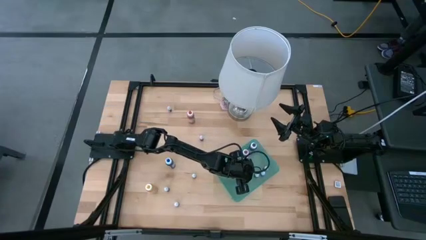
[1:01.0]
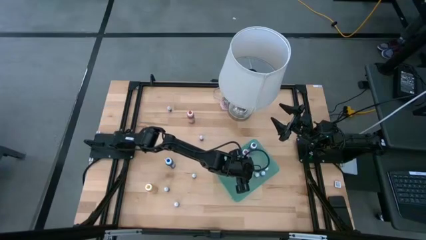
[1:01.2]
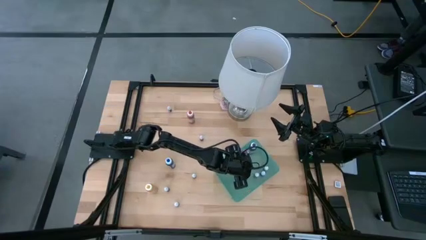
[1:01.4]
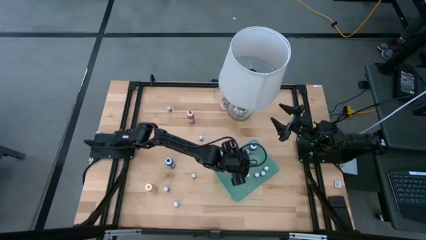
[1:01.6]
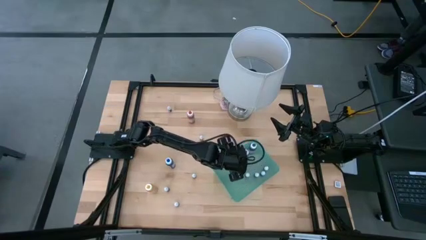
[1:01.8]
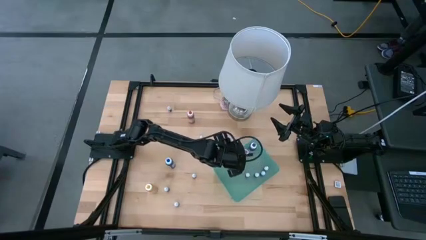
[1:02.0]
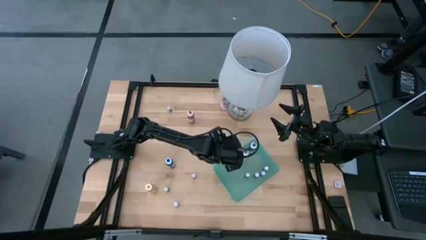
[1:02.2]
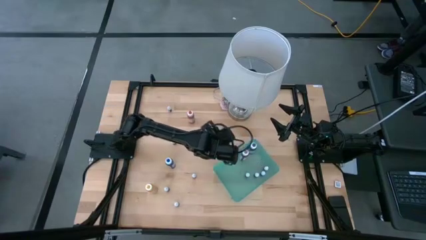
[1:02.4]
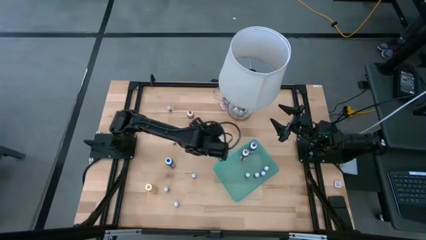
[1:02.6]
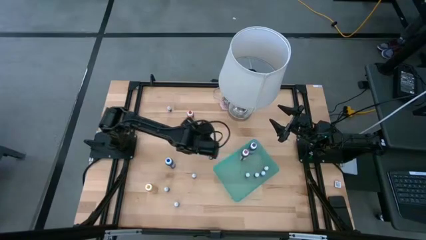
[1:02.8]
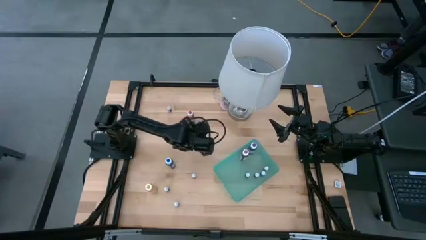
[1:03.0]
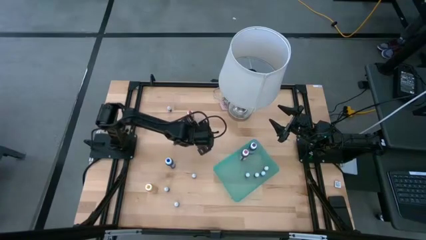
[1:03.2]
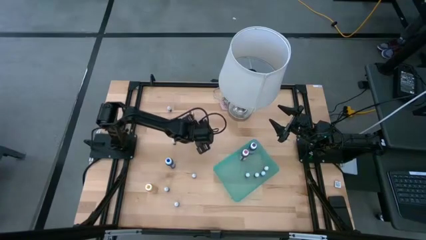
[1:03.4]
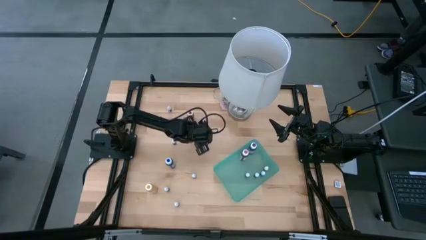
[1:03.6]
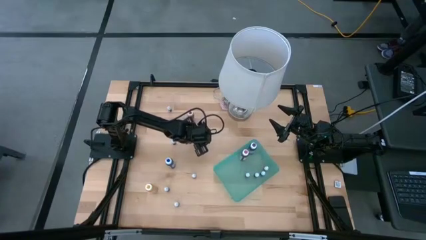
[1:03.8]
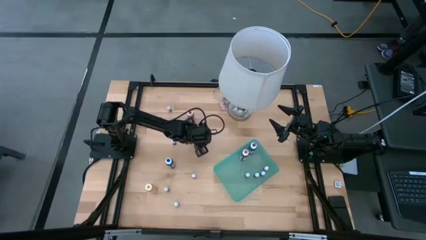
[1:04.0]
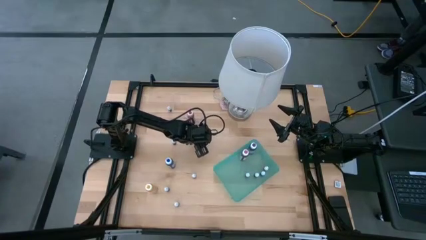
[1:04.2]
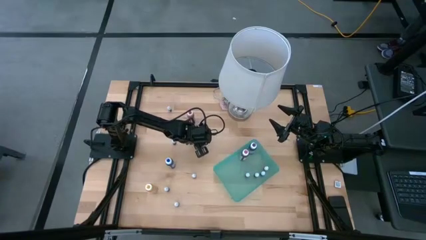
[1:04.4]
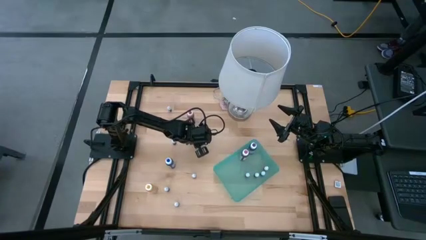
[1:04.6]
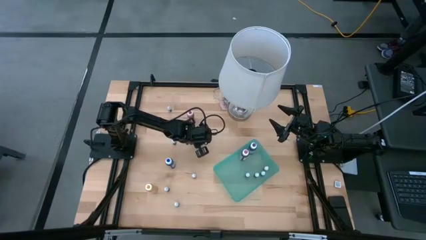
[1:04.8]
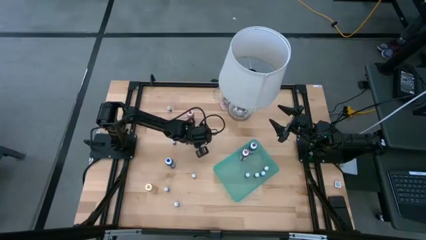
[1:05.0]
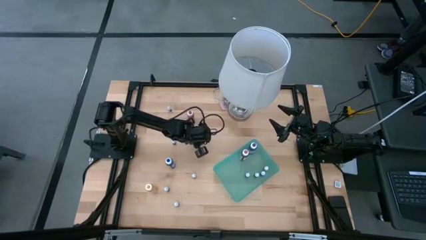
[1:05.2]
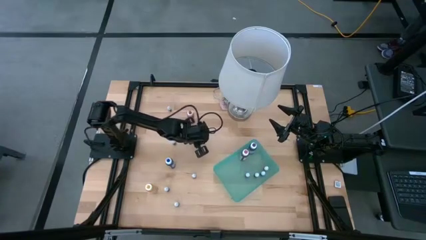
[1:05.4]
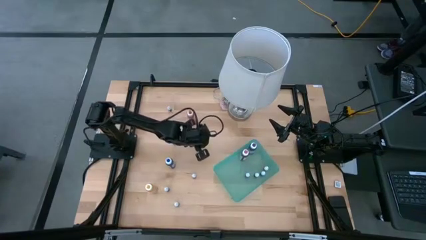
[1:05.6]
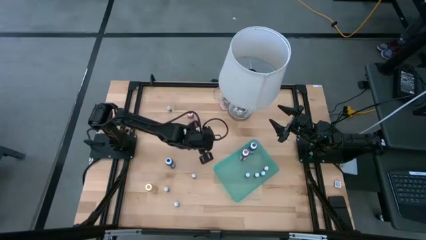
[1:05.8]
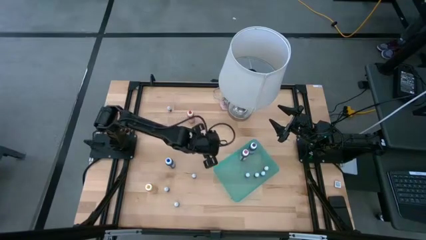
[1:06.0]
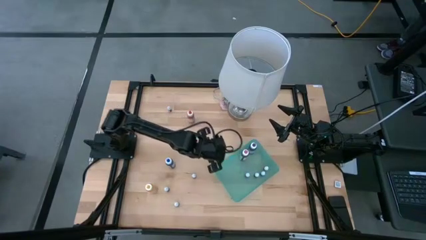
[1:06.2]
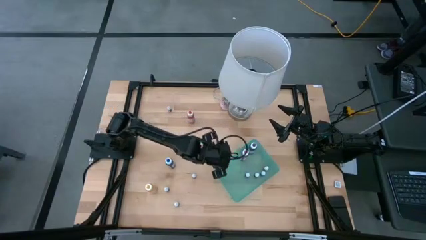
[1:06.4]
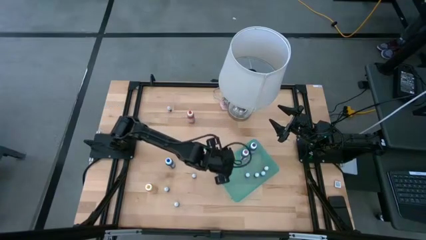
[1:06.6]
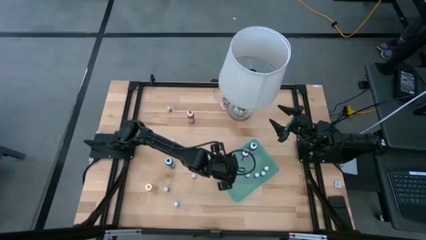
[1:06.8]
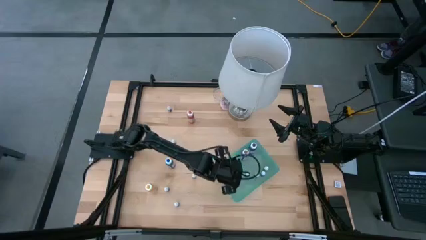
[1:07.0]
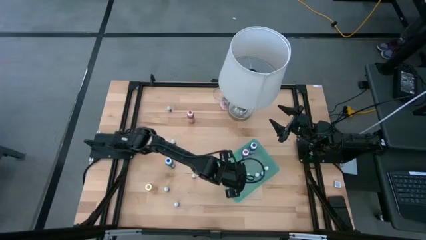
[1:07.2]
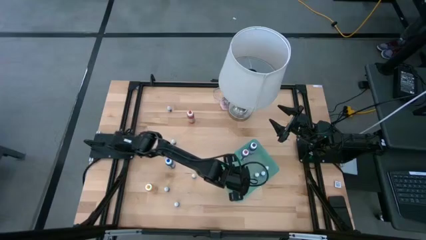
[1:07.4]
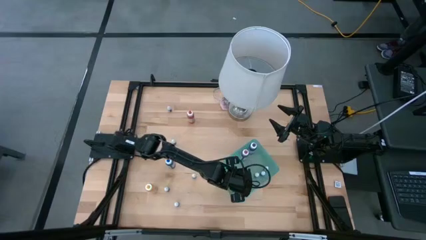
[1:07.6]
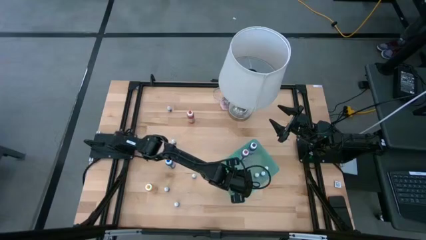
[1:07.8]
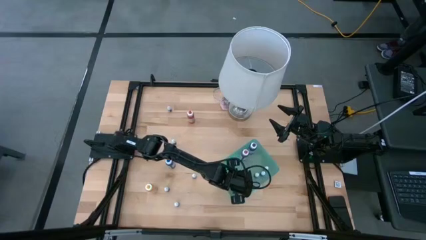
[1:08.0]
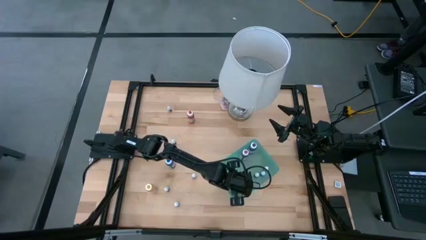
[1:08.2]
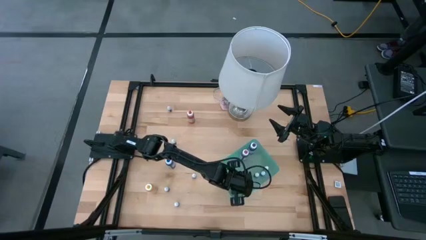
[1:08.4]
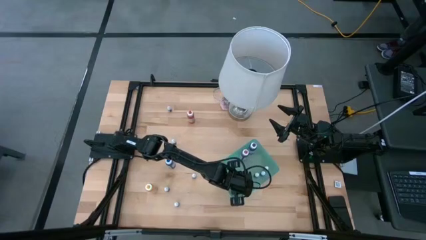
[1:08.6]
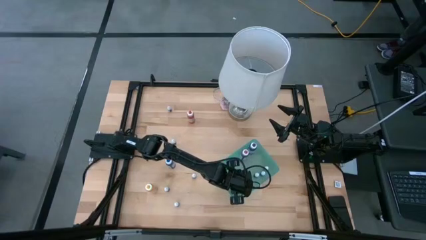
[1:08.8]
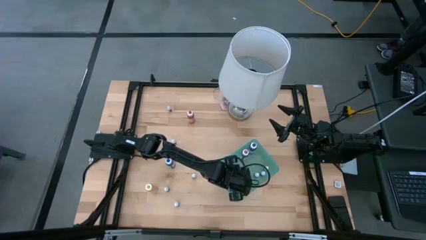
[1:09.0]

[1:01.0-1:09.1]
Task: Pick & Place food coloring
Put the small purple food coloring bottle into the green bin

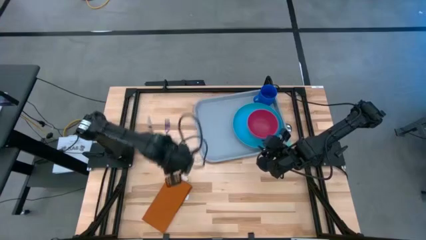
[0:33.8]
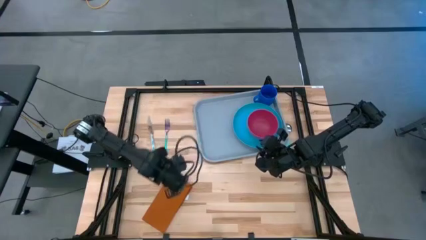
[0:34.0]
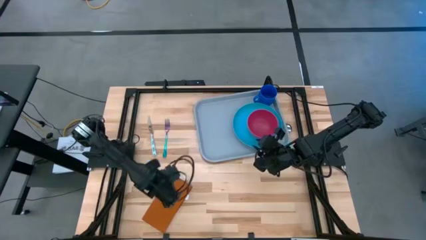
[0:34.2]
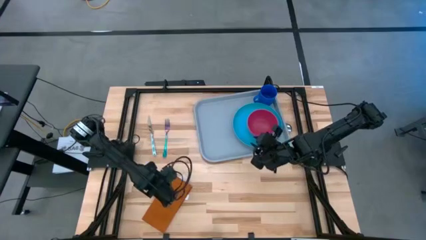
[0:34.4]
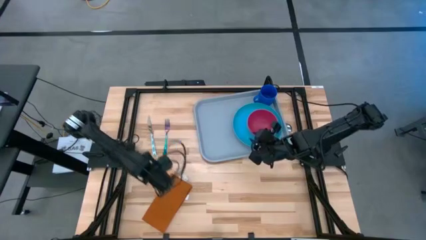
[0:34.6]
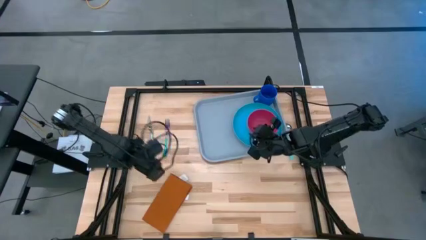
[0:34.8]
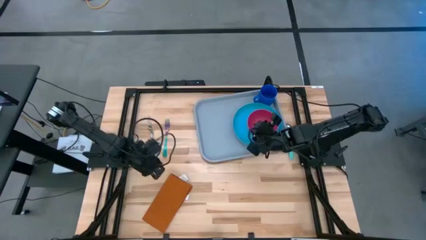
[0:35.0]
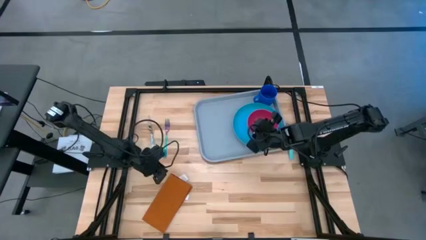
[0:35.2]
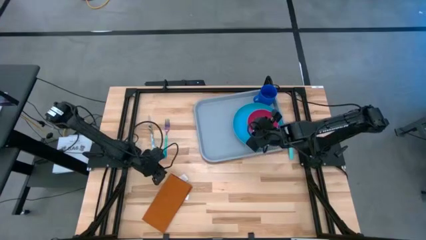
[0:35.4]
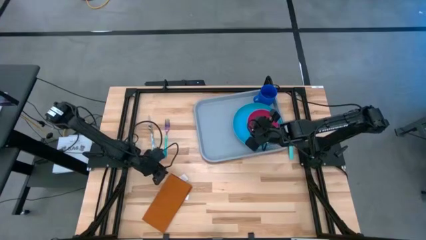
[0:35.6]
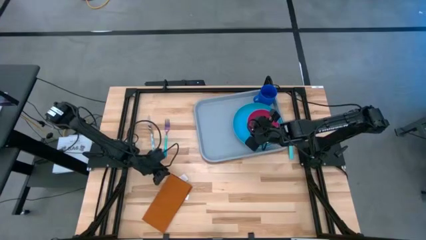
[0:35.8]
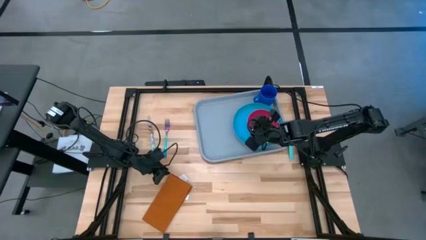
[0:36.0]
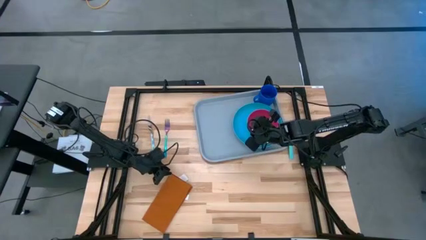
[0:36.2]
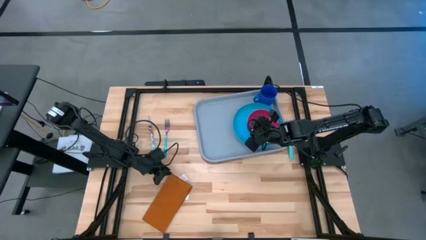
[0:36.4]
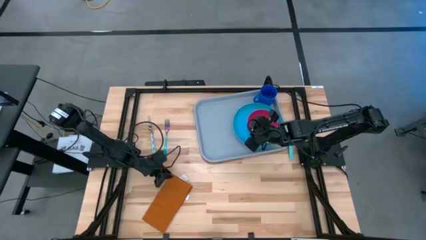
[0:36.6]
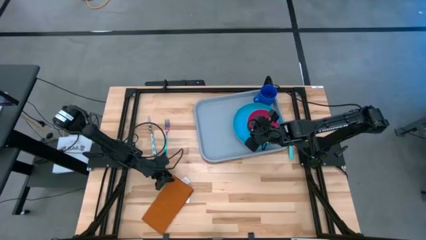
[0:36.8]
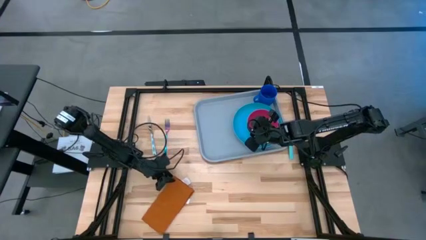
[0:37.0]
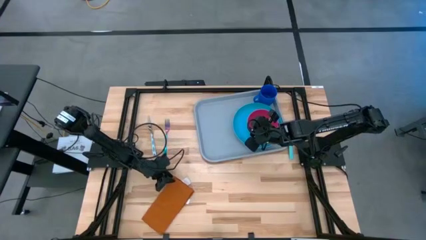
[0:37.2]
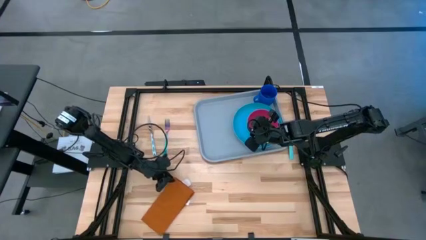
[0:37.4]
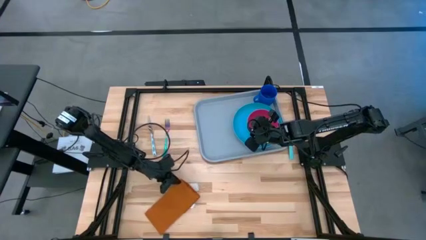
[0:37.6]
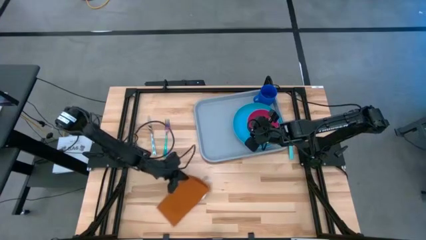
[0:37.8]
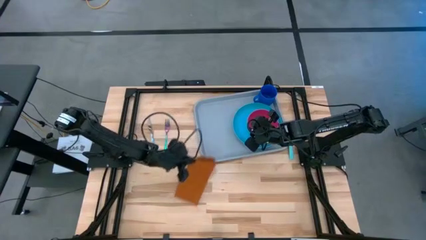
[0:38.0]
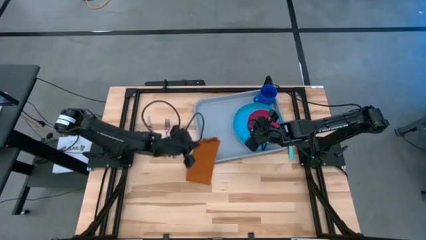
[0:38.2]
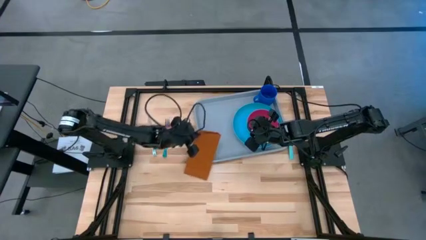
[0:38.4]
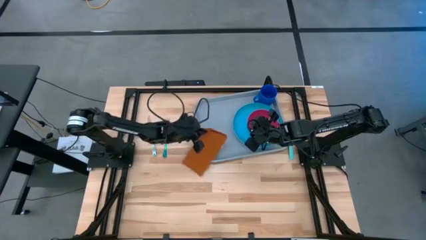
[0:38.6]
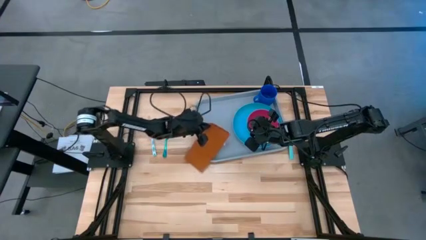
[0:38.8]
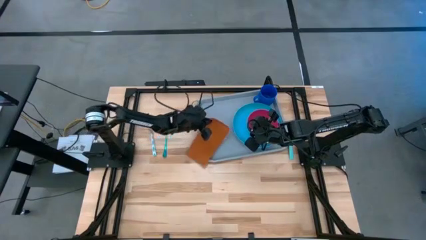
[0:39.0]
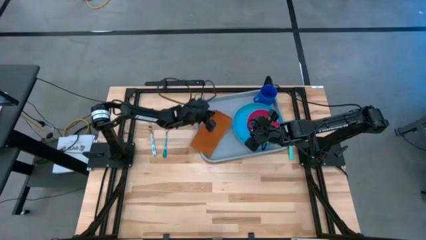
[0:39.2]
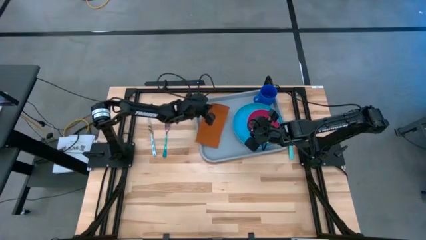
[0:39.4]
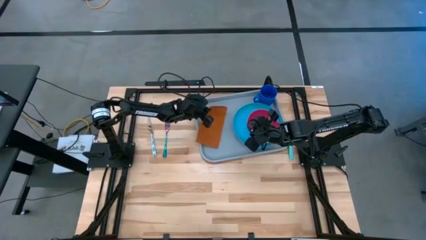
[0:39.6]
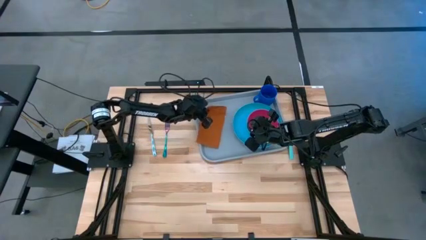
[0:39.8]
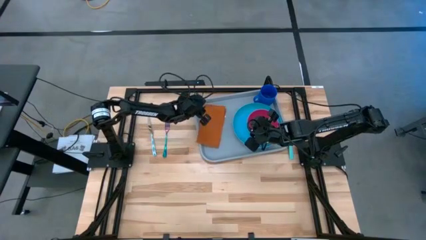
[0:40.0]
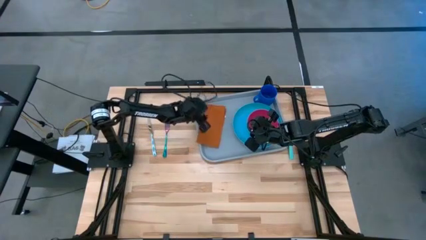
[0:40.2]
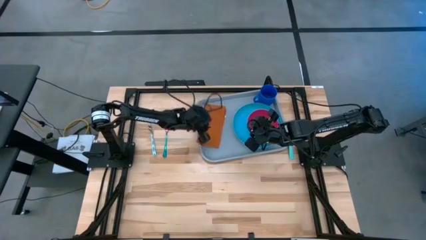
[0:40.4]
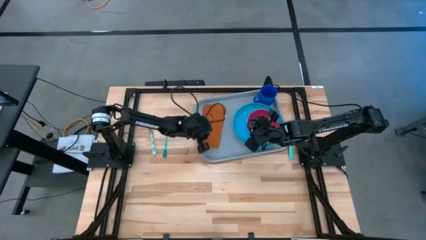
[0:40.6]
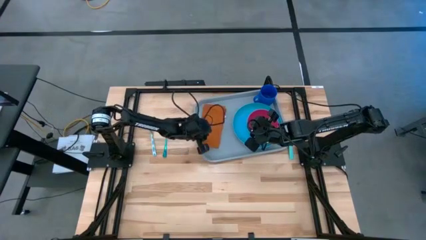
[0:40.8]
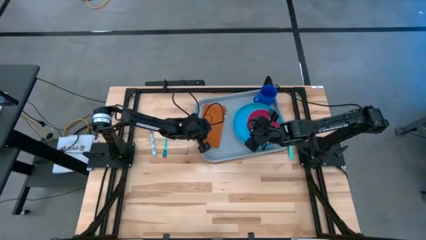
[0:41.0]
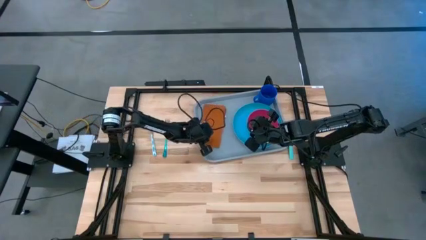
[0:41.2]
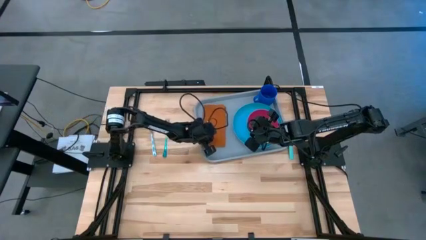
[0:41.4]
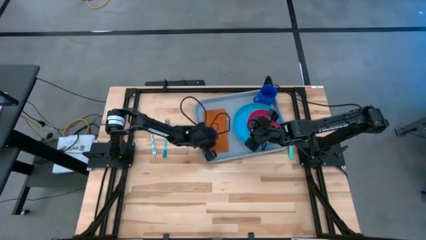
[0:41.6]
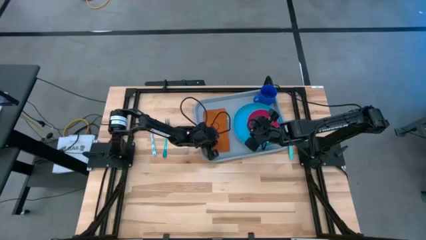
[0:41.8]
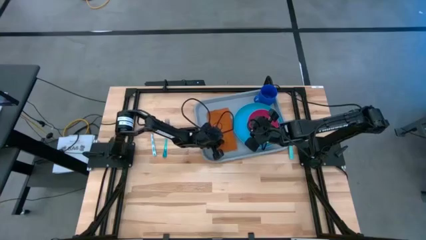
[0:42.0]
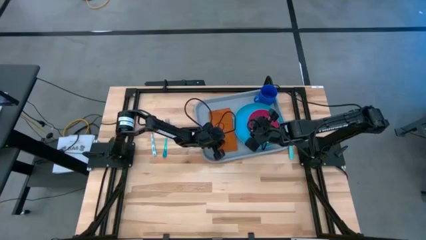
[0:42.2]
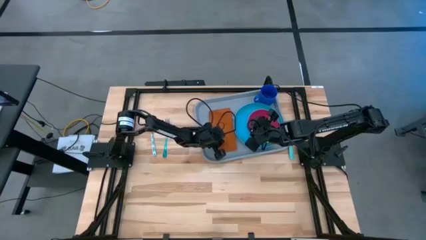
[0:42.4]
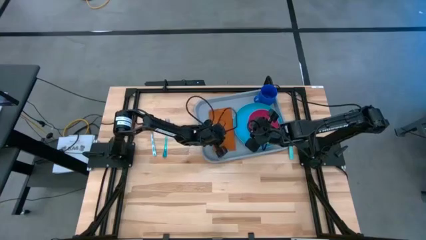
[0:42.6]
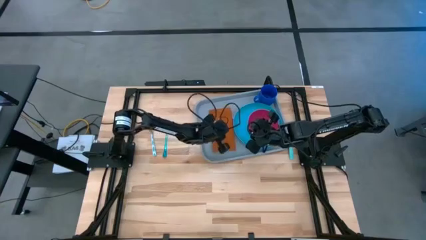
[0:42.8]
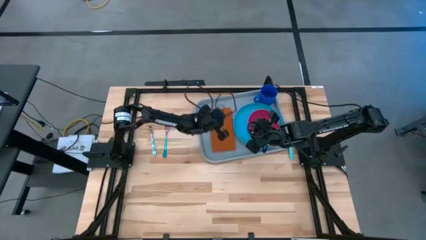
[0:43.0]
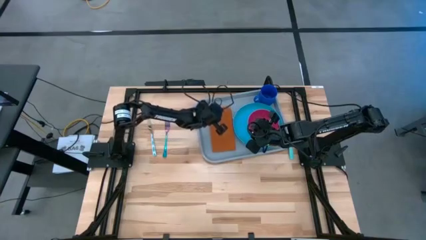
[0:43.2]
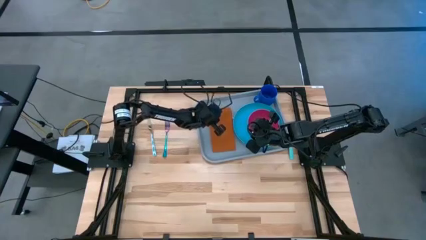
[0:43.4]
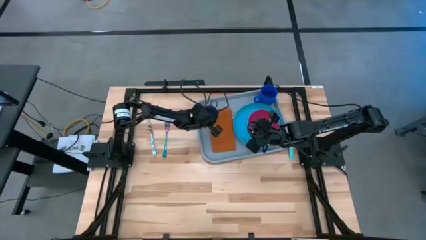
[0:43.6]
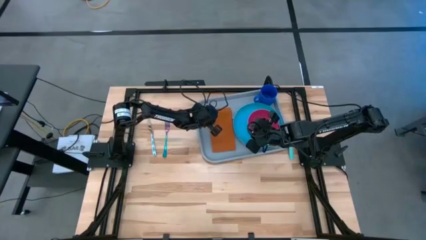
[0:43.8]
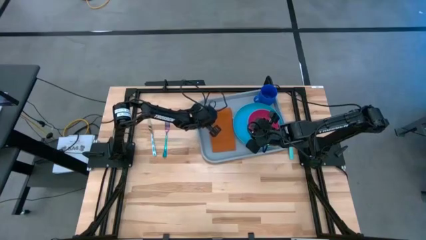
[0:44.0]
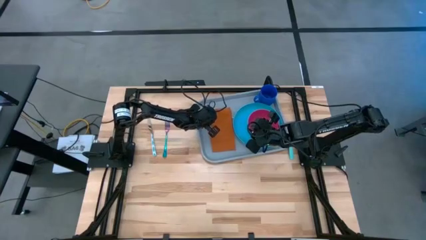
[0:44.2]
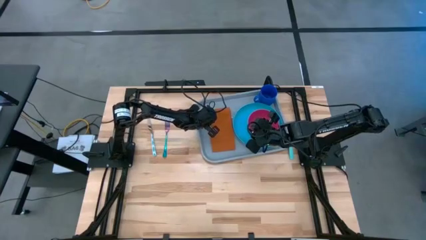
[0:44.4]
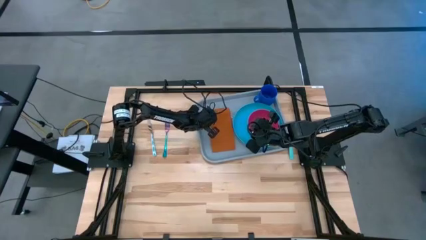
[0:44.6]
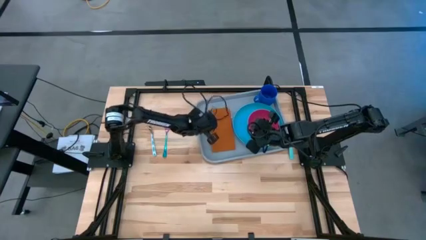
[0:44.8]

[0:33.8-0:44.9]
Task: Set up tray
Put the orange table napkin to the left of blue plate on the gray serving tray
